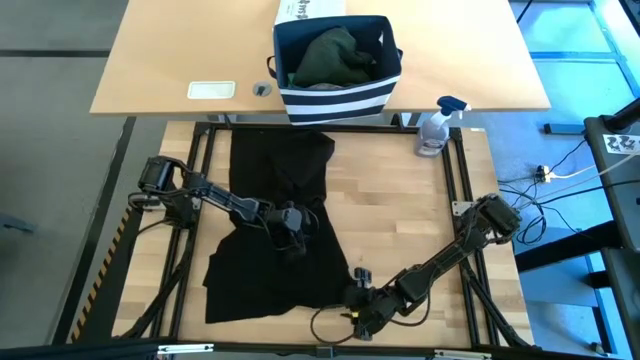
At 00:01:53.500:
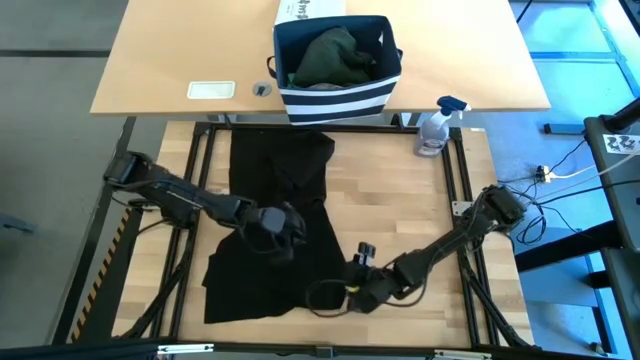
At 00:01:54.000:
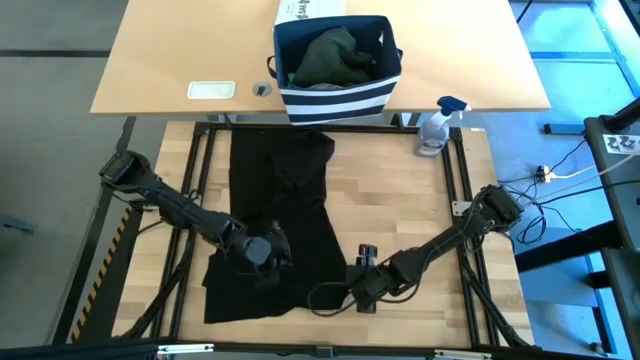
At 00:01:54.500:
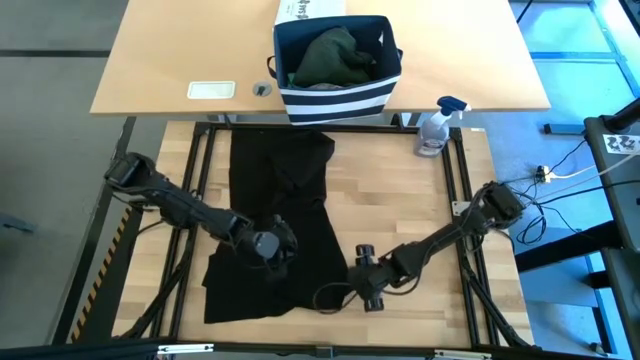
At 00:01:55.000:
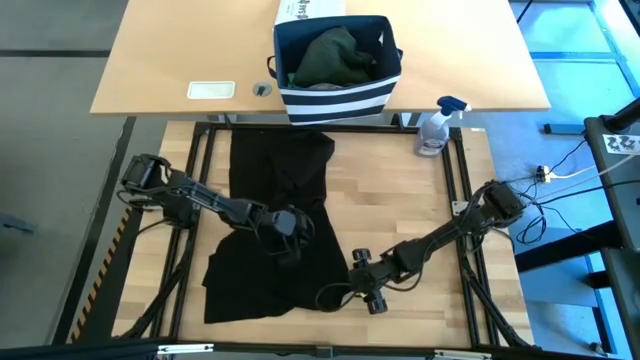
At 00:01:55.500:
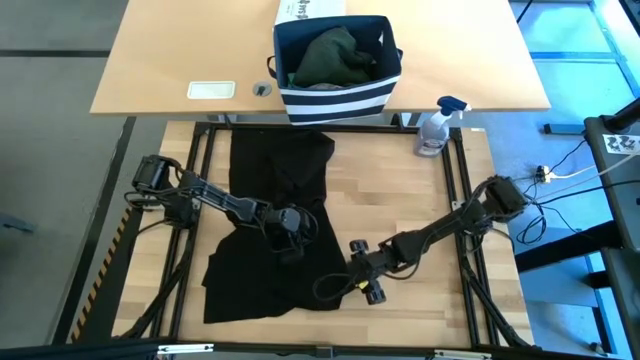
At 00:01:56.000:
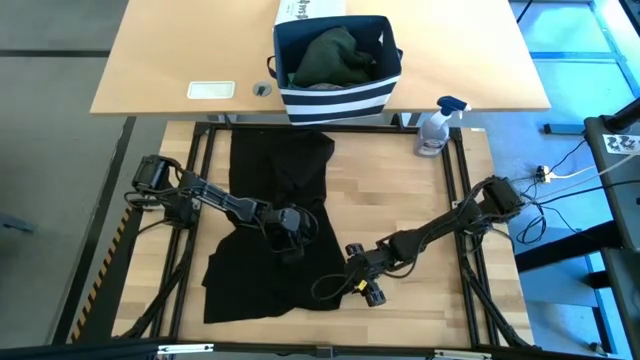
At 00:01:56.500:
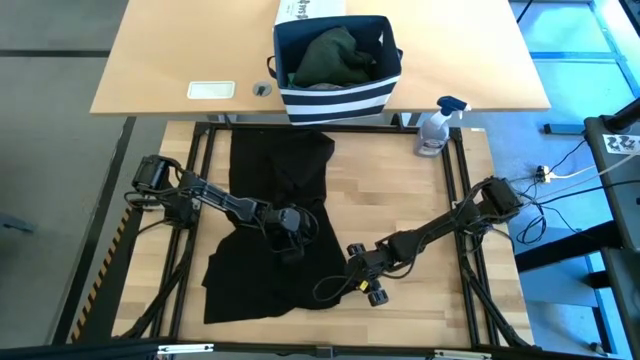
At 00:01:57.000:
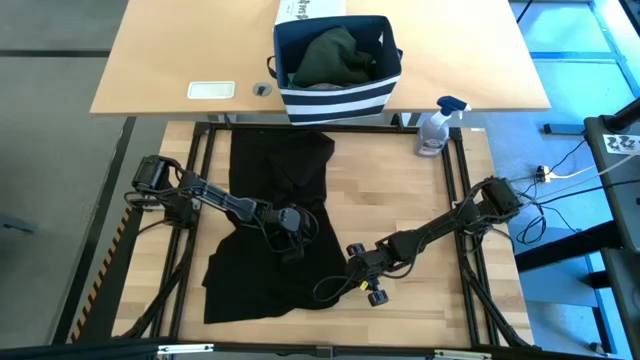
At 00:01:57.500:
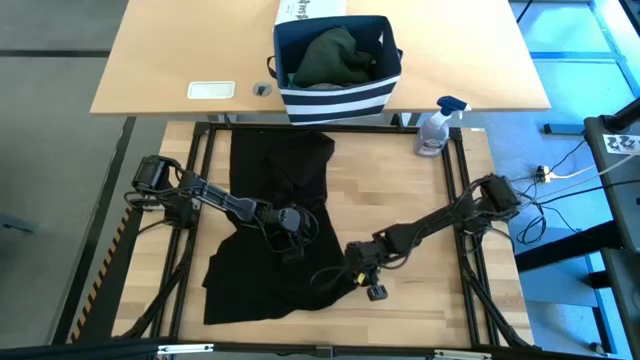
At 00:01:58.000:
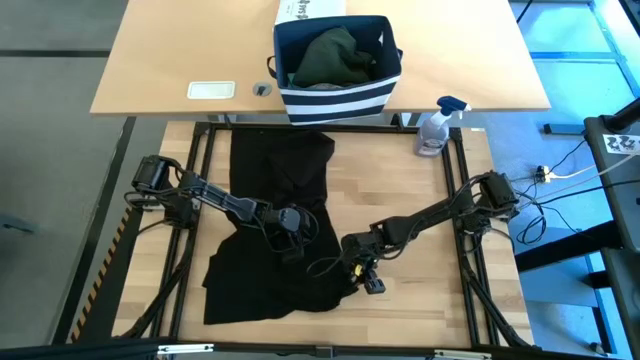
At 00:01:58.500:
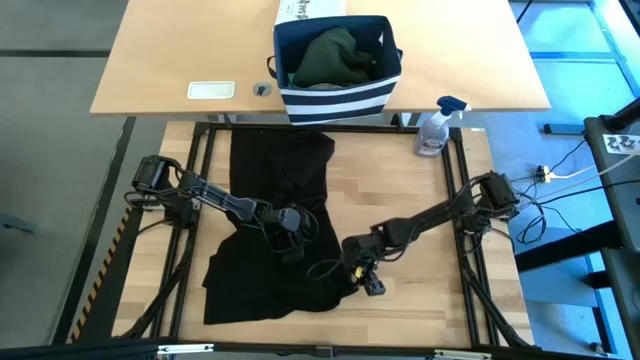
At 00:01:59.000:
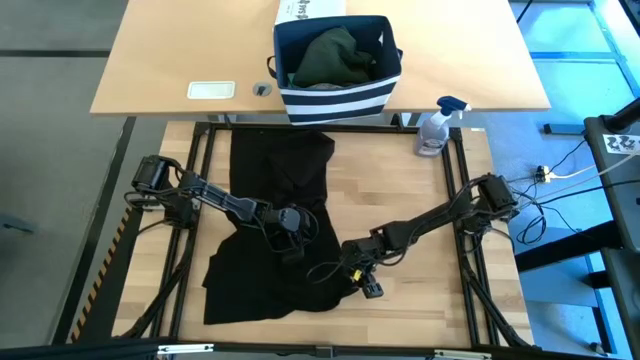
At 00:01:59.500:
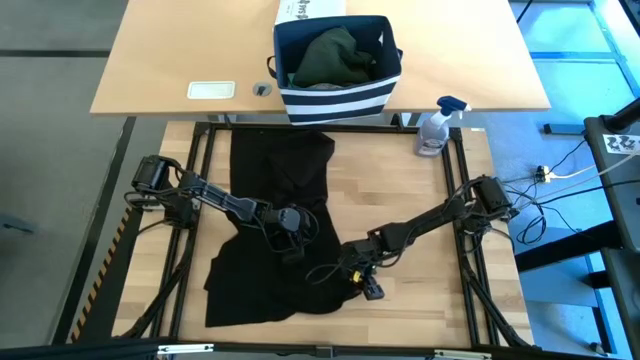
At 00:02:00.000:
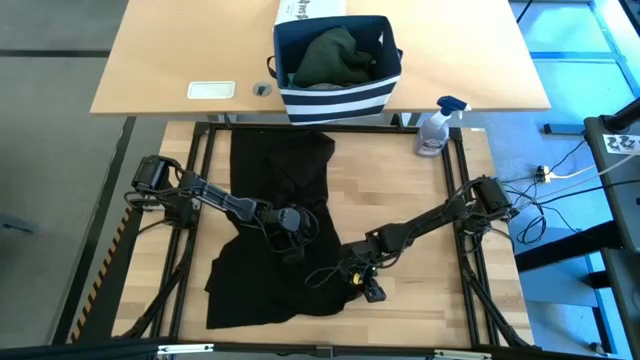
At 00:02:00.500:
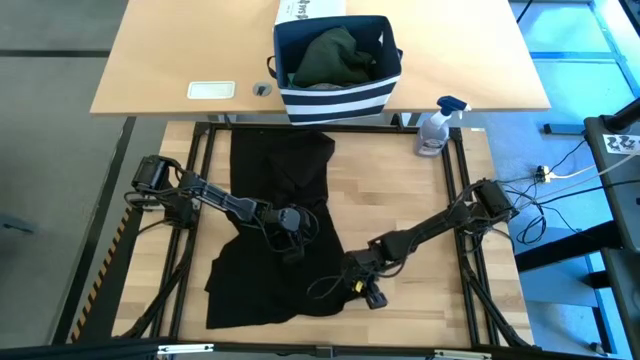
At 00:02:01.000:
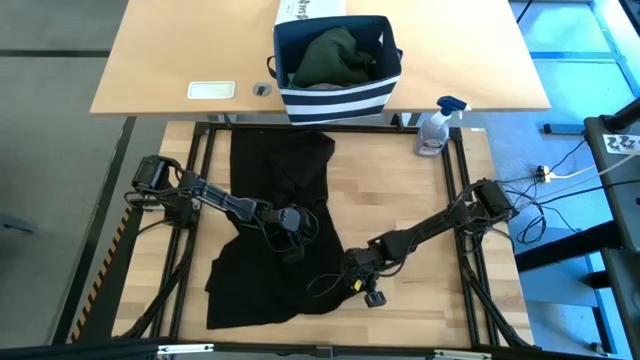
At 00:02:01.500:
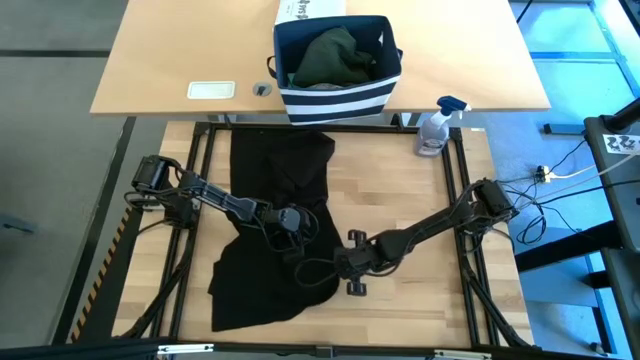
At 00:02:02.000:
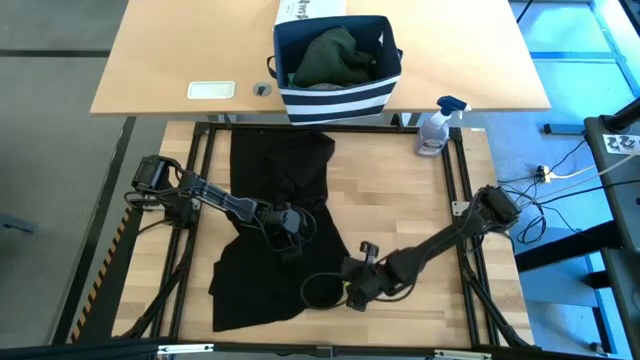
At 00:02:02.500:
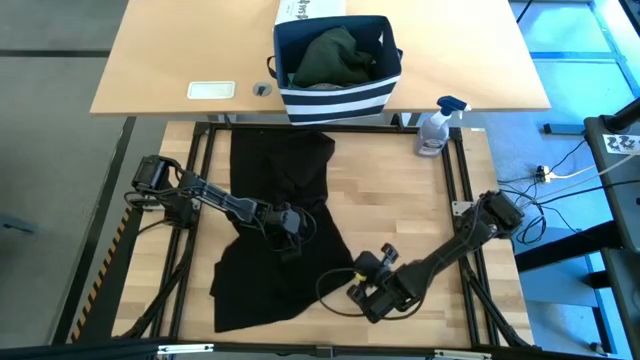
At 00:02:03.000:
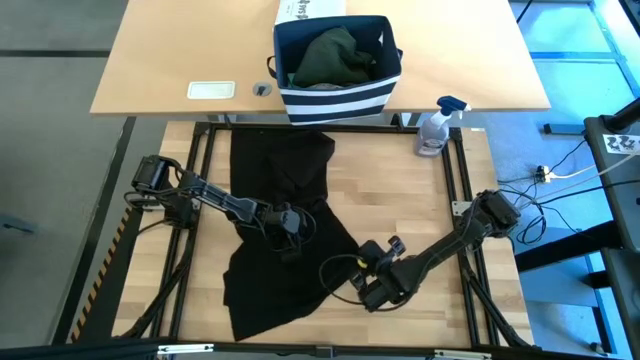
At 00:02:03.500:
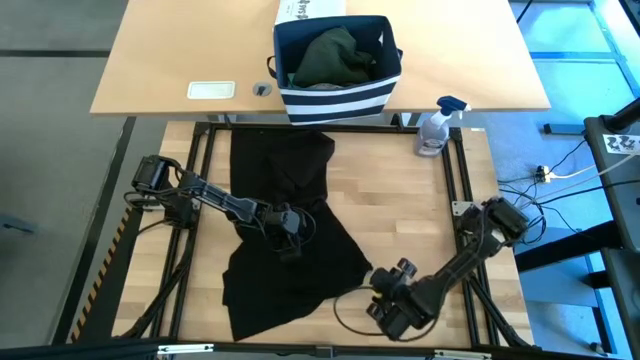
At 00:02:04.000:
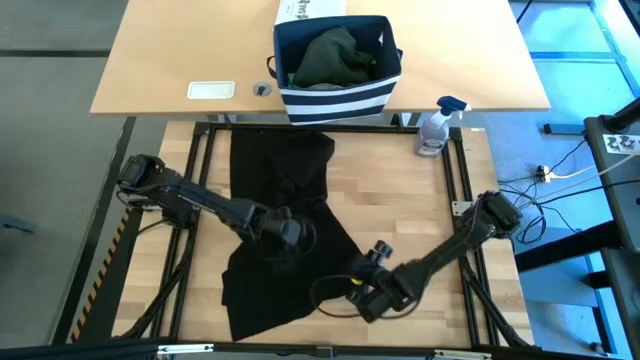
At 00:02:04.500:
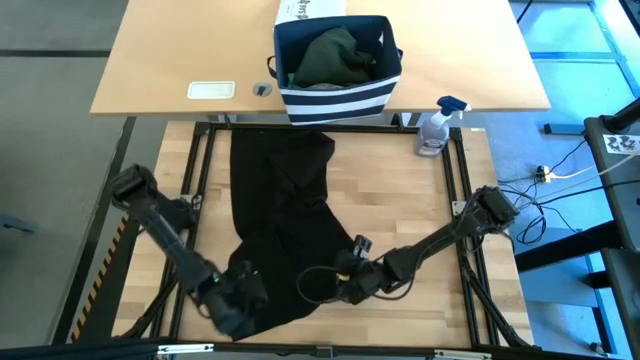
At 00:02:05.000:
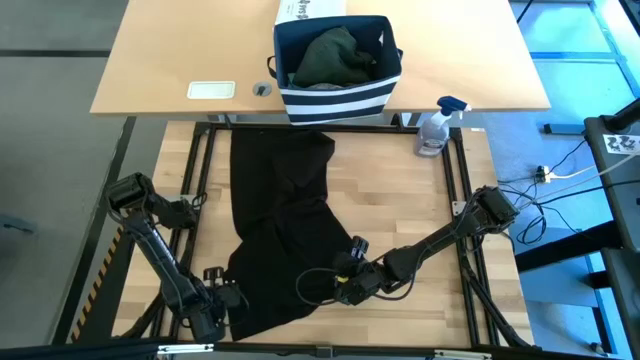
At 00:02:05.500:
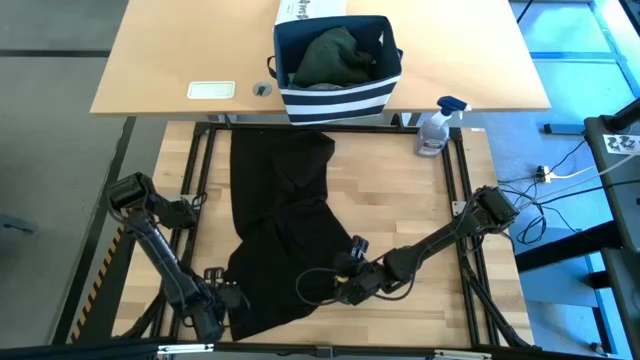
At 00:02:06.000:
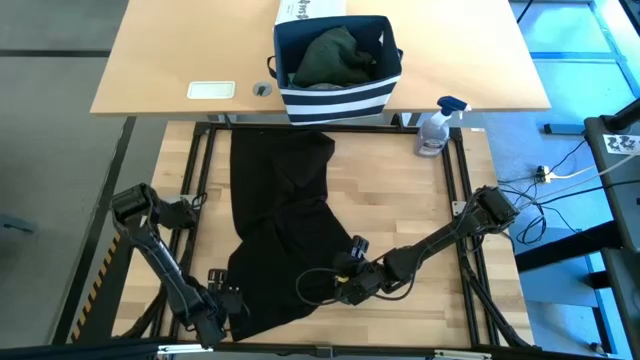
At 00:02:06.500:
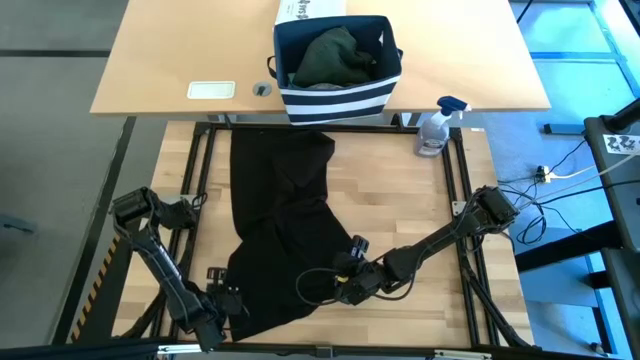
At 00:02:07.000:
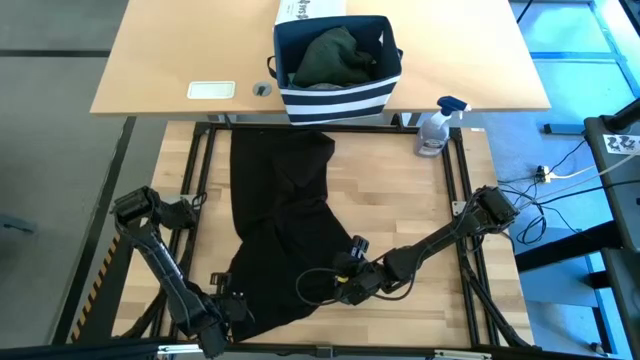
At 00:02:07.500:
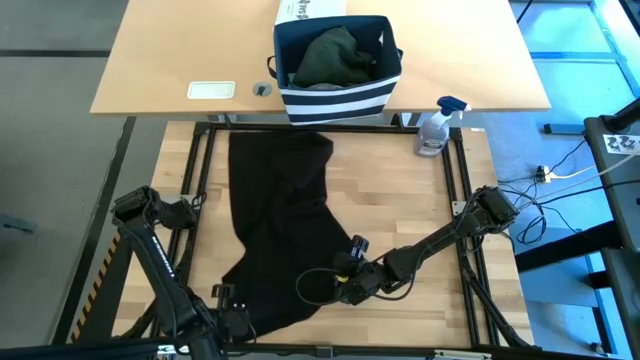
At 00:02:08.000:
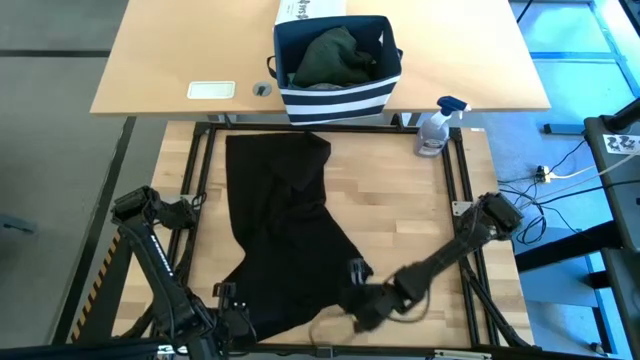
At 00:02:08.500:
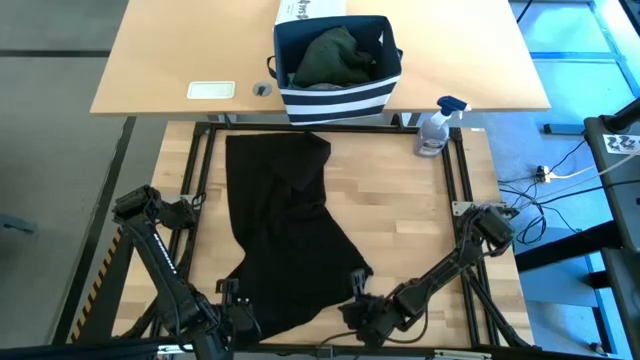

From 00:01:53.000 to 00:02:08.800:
Task: Fold Laundry from Bin
Fold the black shirt

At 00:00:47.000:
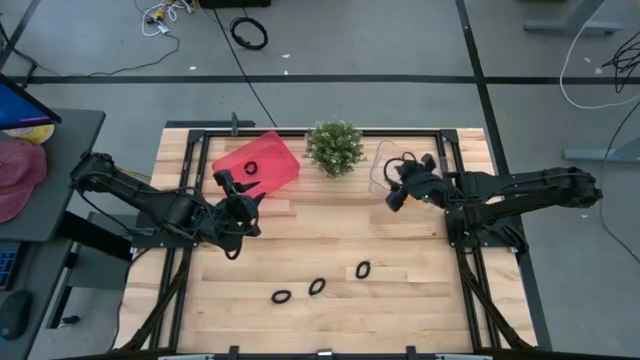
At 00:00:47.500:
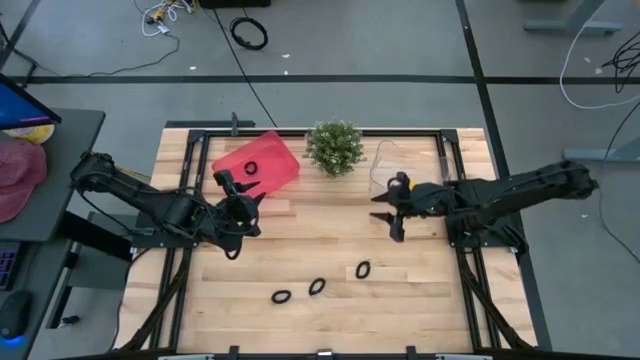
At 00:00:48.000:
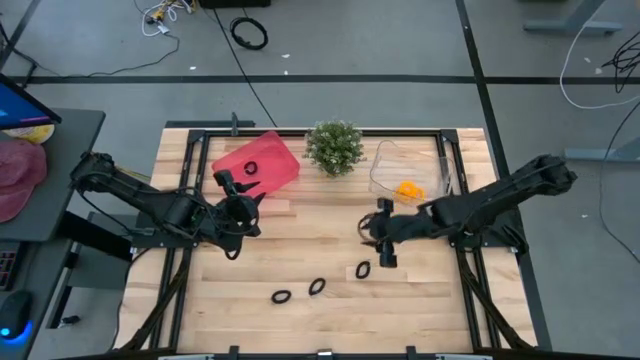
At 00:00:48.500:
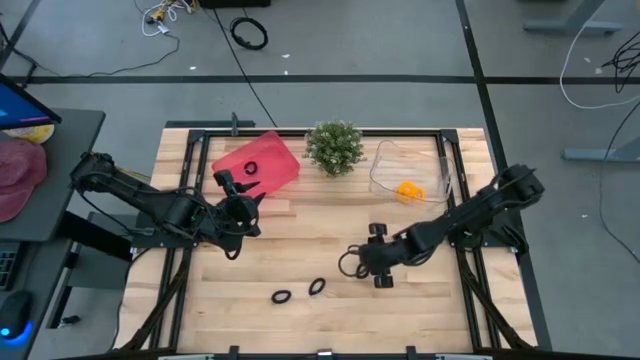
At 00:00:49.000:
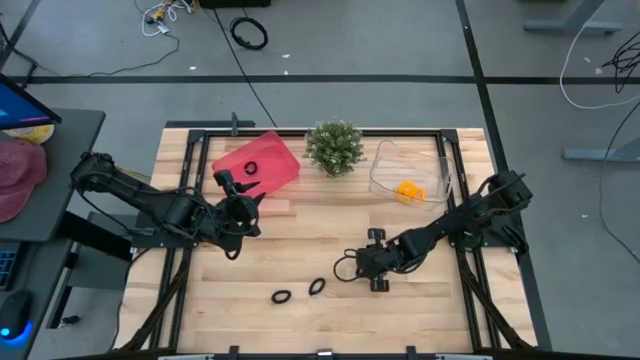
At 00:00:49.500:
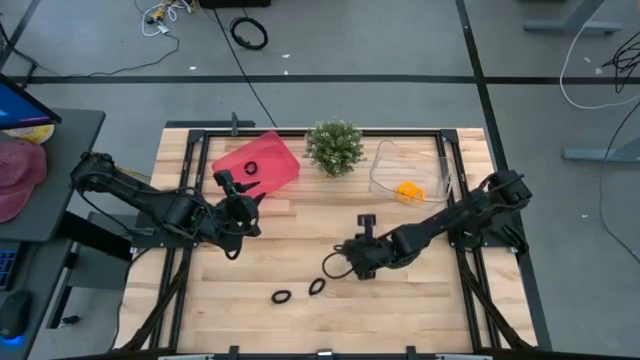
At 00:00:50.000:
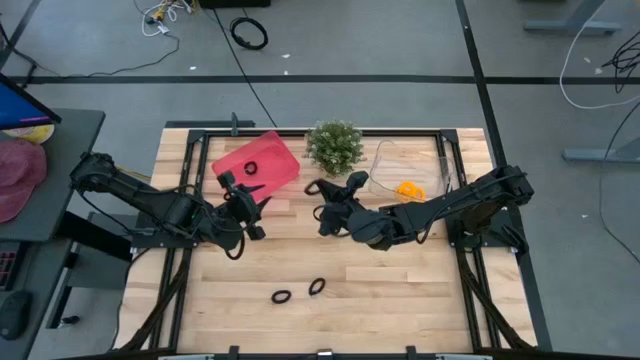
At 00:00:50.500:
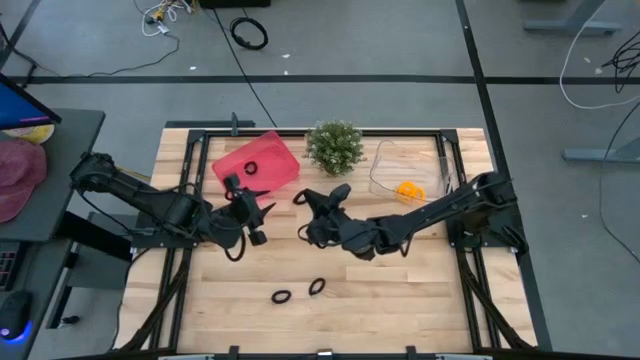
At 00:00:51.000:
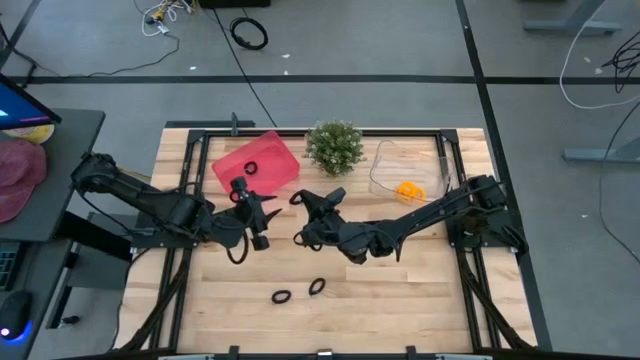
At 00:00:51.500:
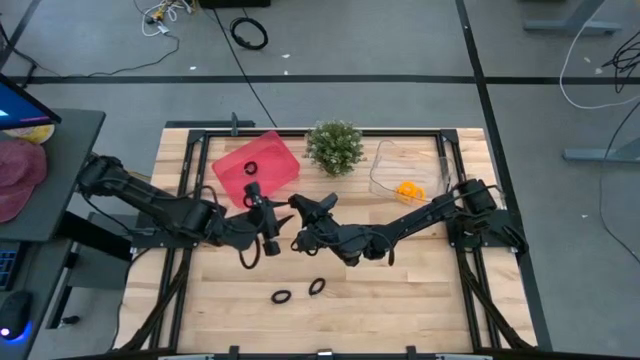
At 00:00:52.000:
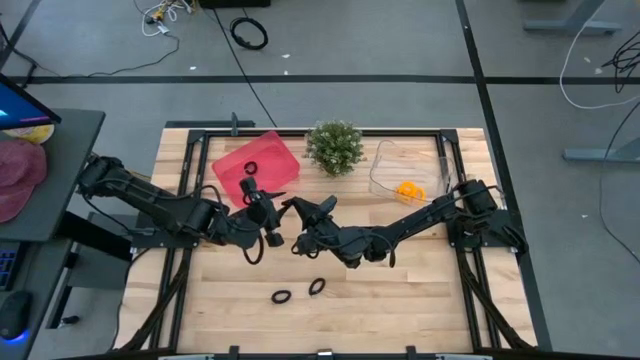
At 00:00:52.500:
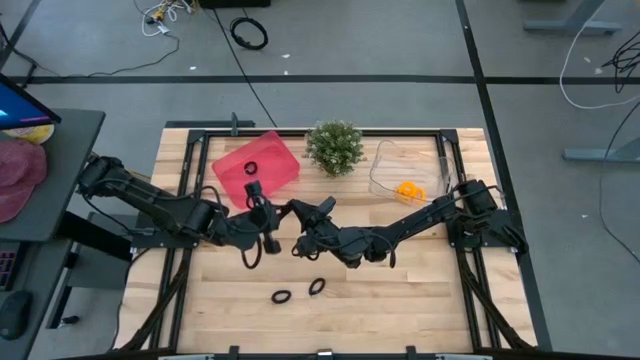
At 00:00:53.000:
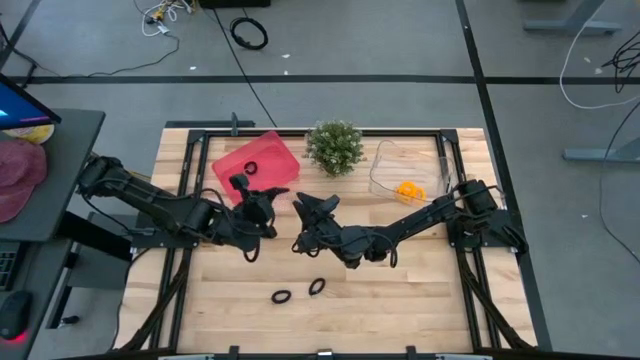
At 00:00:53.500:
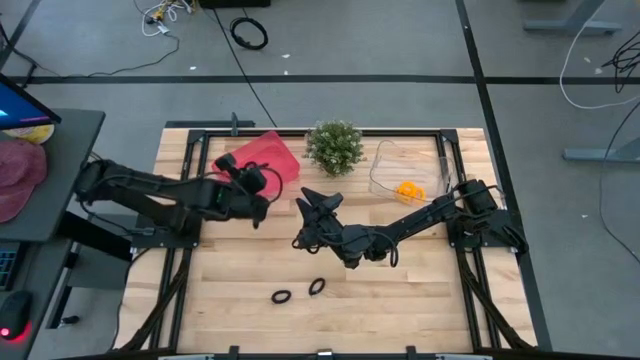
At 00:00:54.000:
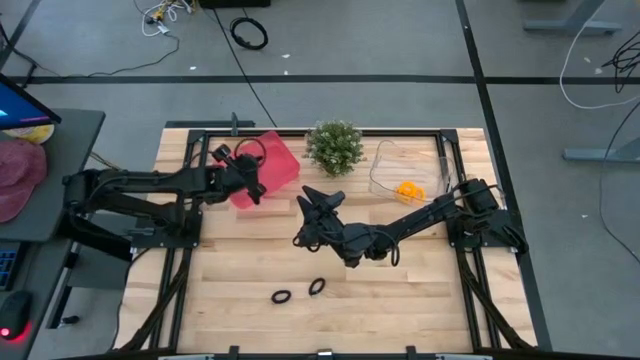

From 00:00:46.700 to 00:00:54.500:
Task: Sort spring keychains
Put the right black spring keychain into the red bin
